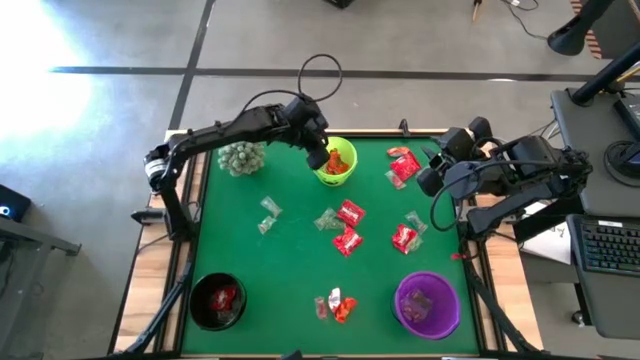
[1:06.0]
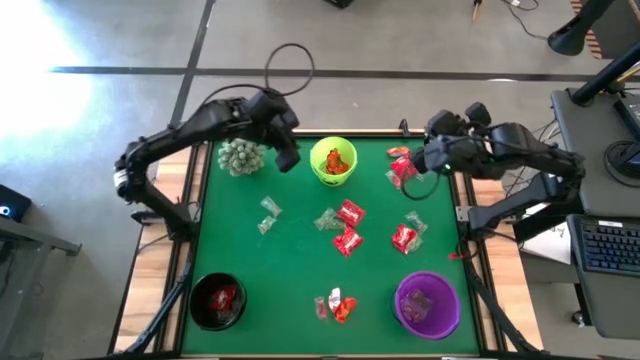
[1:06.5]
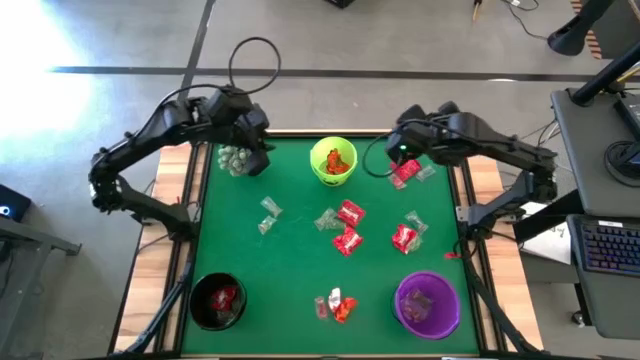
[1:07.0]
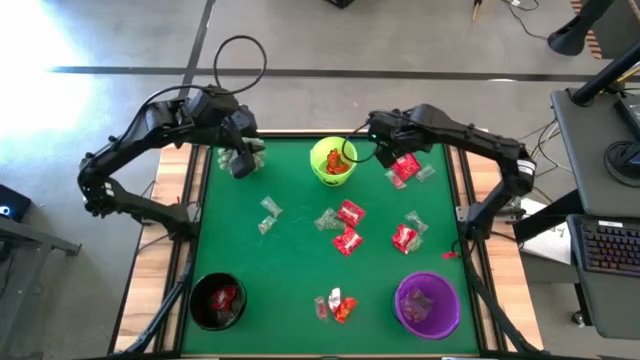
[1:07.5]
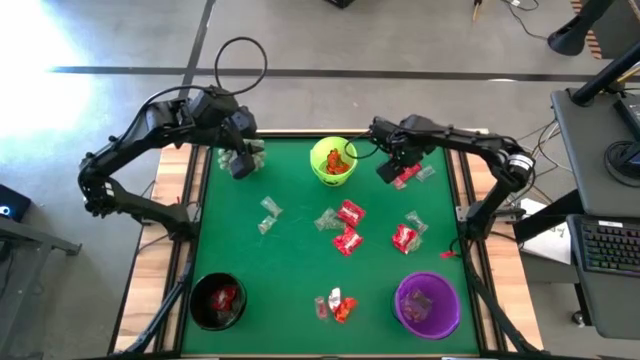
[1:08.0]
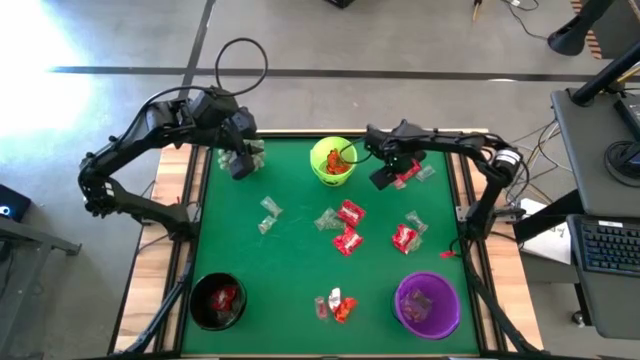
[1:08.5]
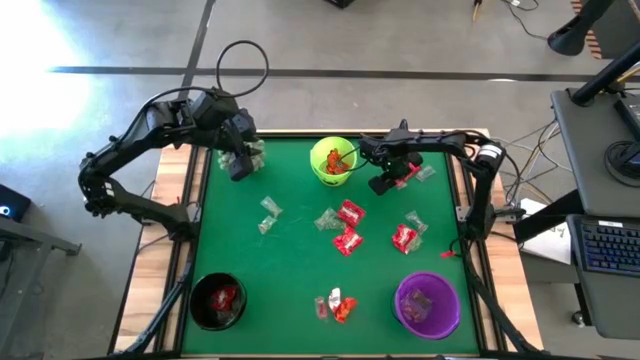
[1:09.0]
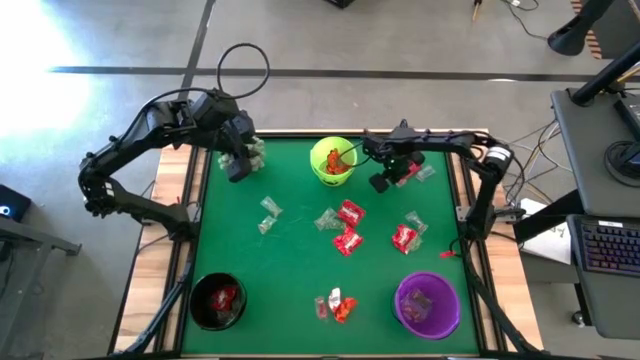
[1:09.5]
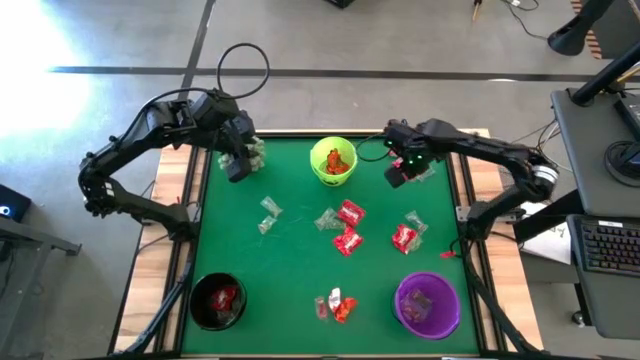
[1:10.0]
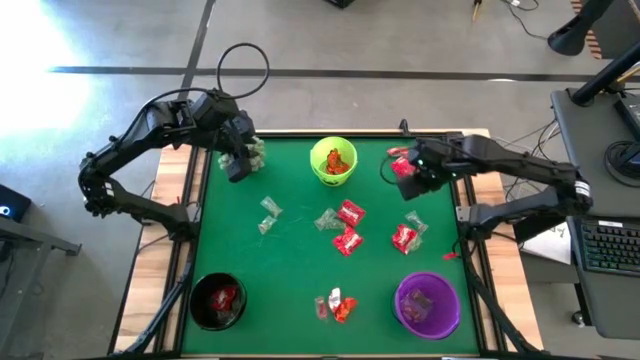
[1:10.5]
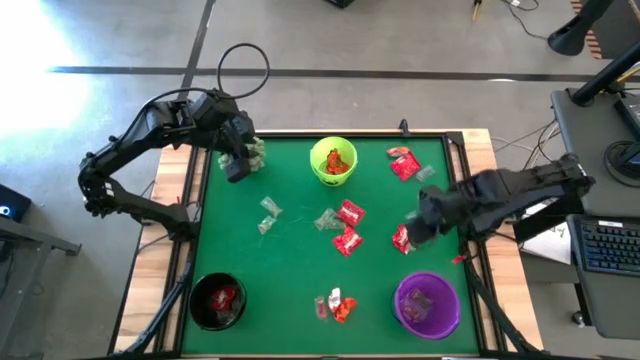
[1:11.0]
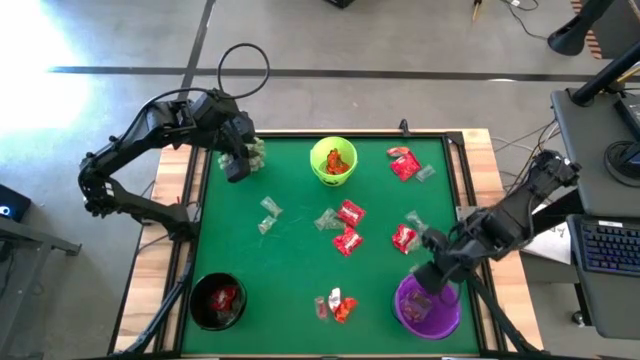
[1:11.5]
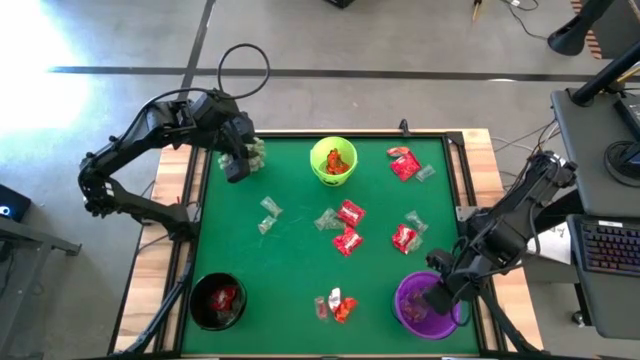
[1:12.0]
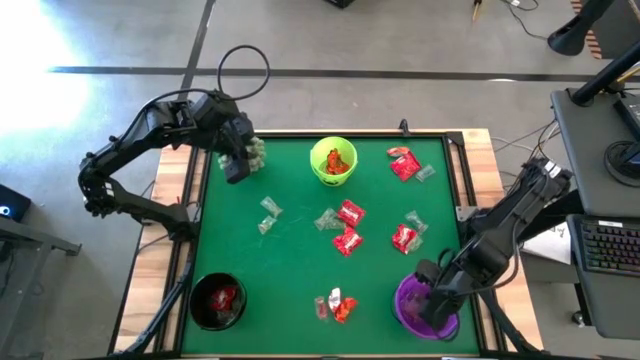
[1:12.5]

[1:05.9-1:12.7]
Task: Organize candy in baskets
Put the red candy into the violet bucket

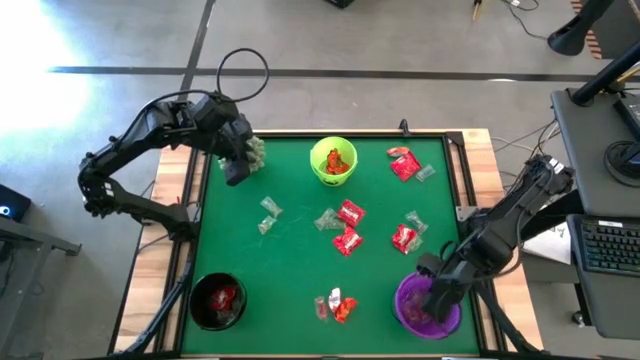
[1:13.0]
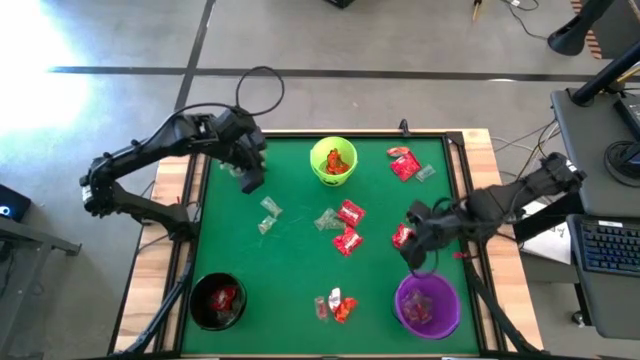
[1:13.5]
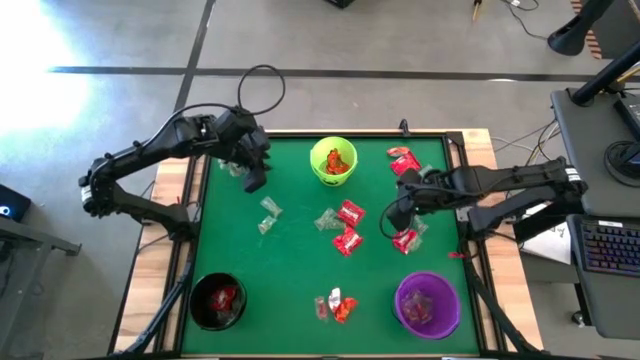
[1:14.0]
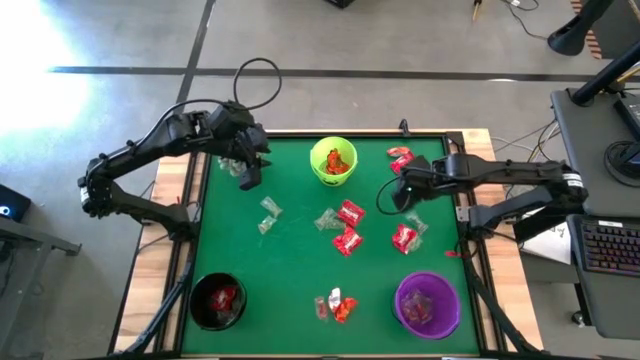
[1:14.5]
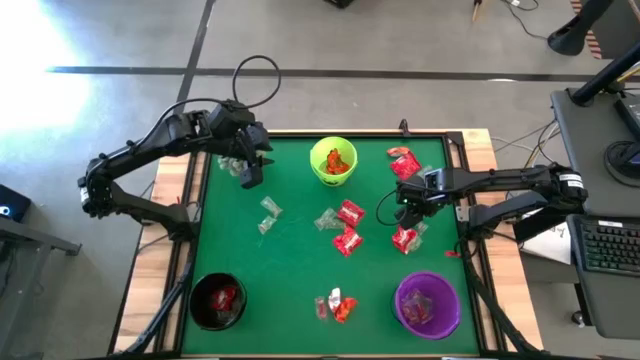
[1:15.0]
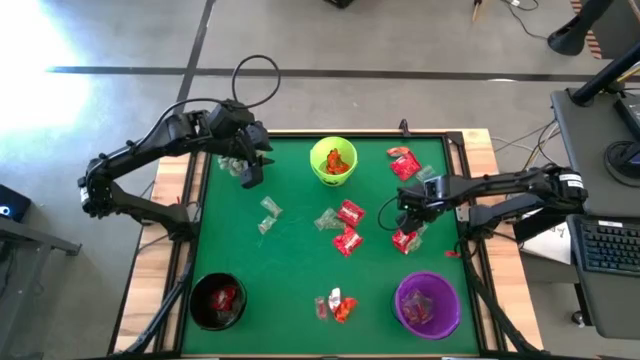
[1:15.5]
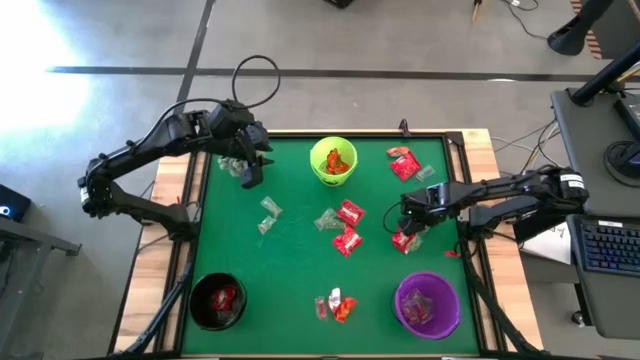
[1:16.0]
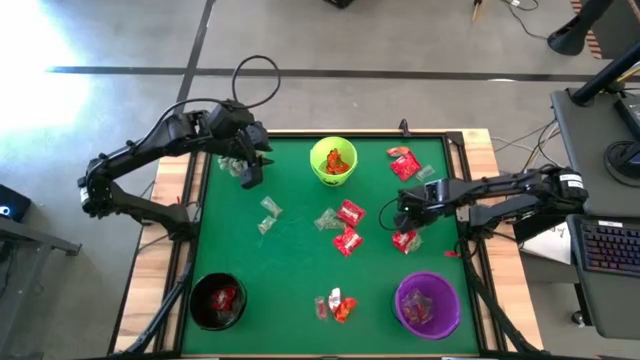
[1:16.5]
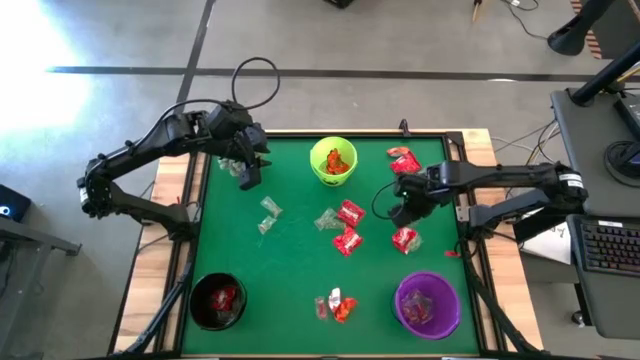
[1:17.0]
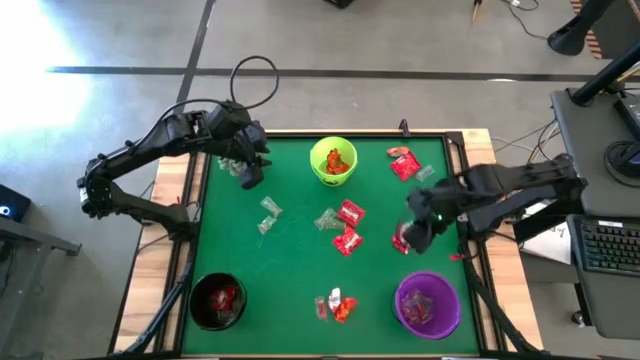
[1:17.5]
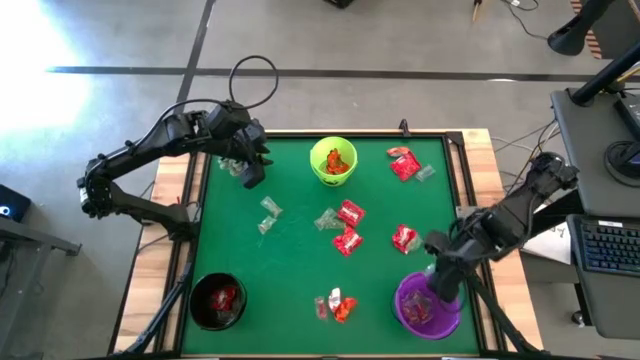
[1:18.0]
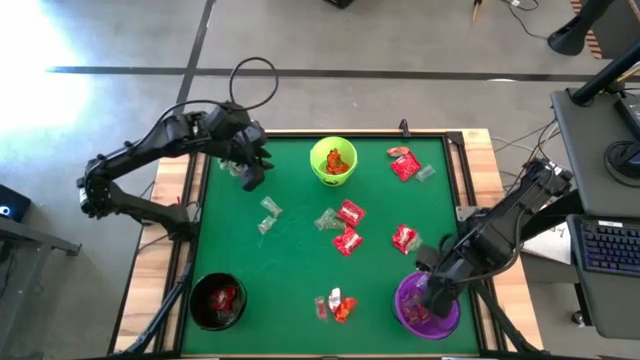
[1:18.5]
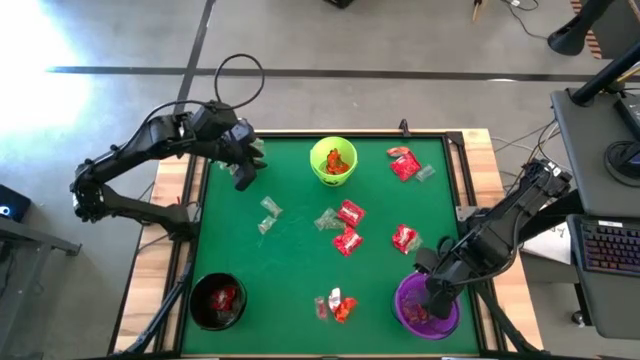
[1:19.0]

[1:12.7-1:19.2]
Put the blue candy into the violet bucket

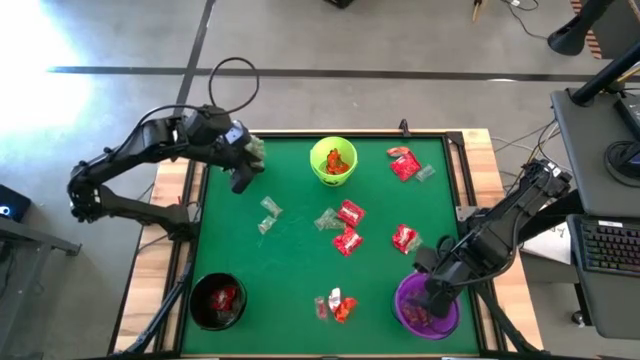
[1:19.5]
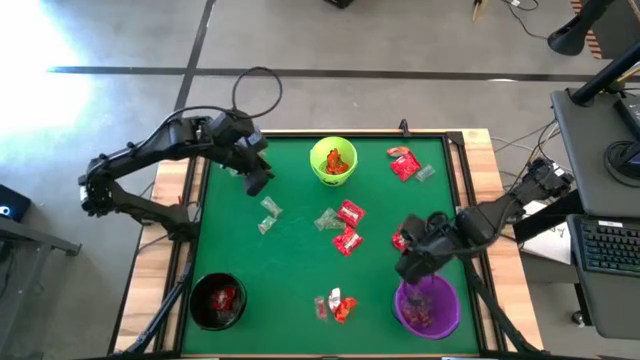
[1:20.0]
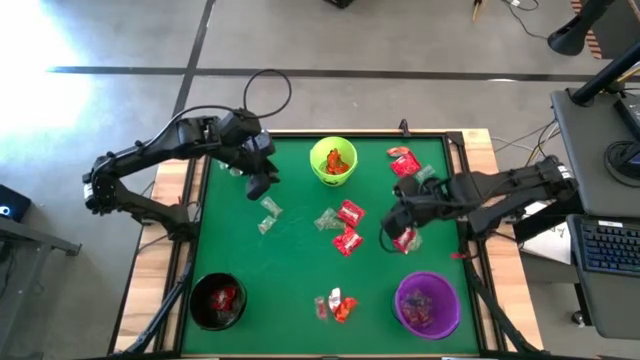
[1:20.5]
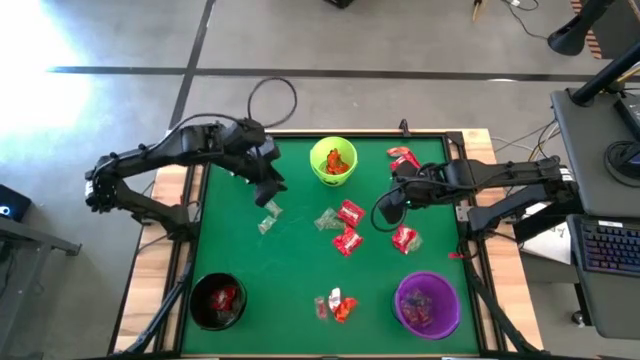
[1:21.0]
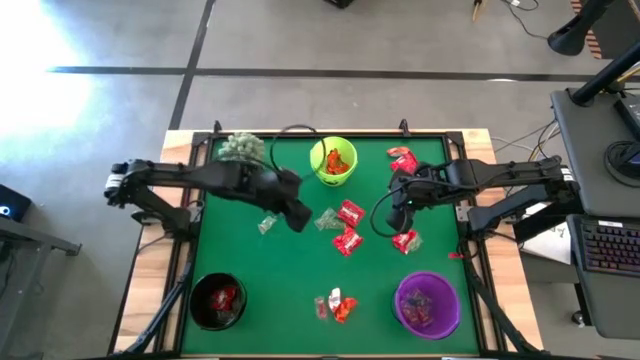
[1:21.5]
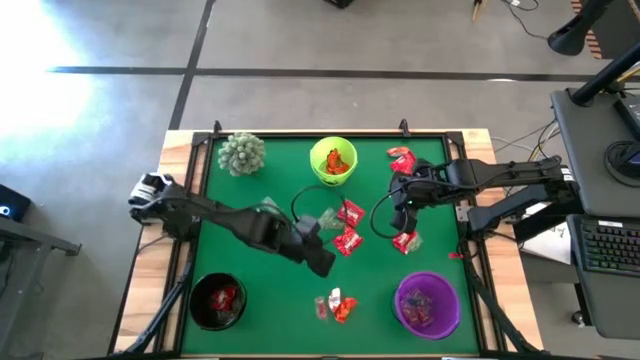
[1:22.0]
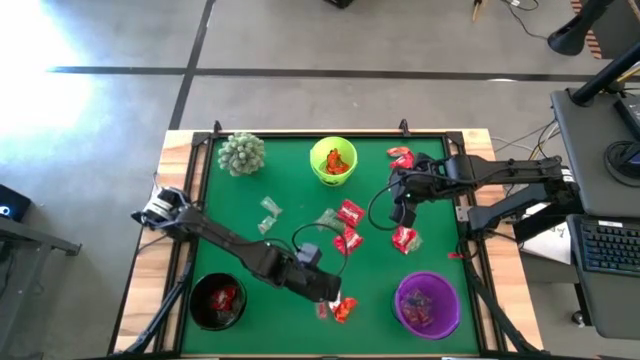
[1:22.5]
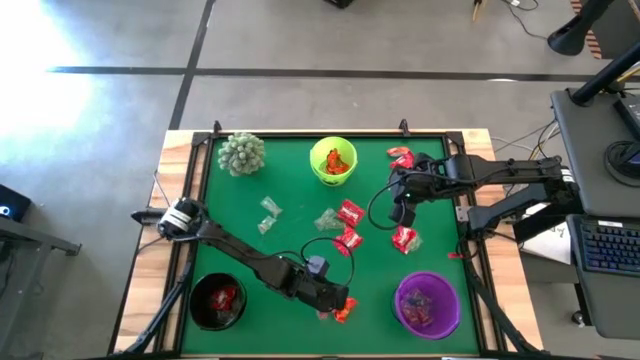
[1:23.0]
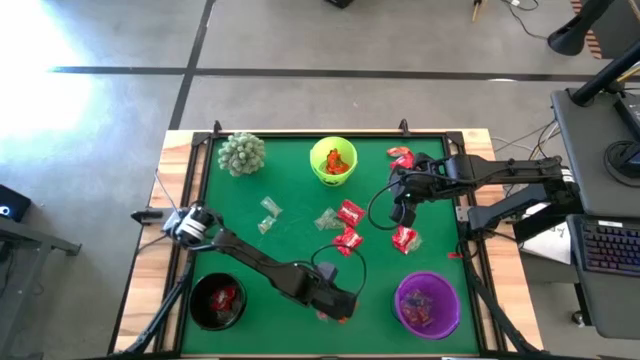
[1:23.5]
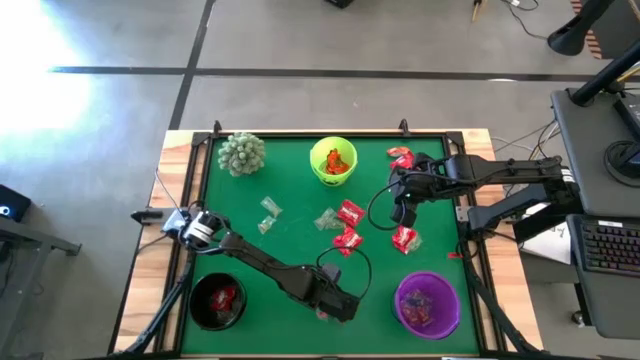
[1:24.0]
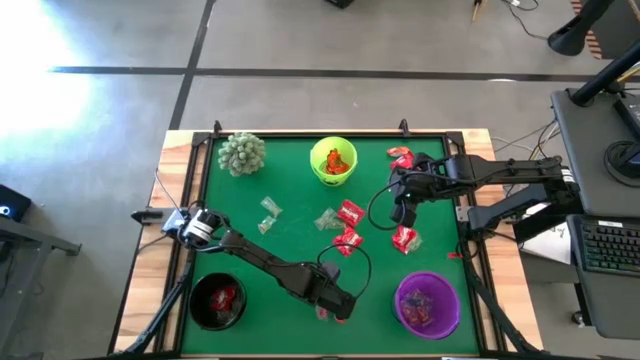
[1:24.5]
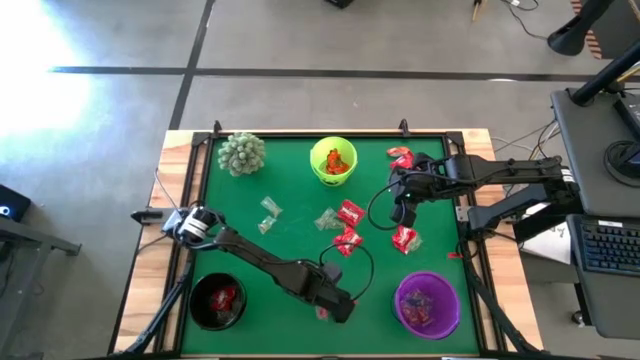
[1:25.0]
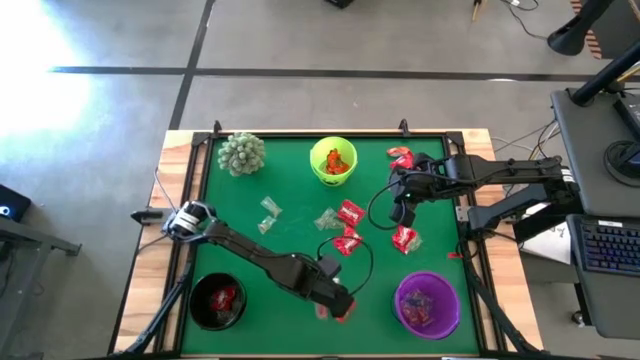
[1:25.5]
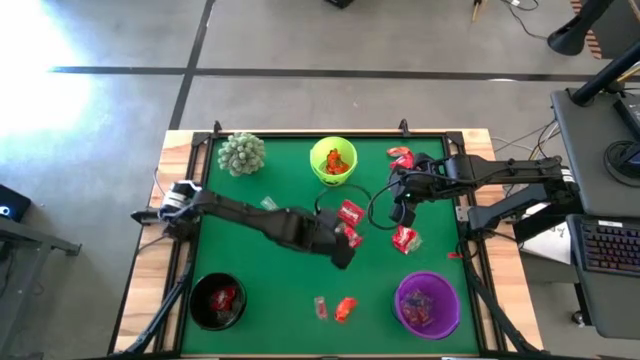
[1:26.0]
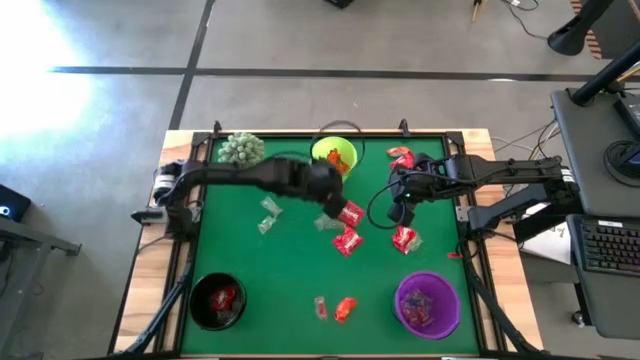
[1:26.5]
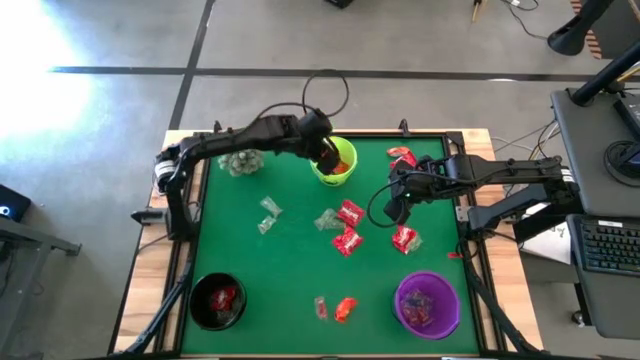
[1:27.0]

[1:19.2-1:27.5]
Put the orange chocolate bar into the green bucket
